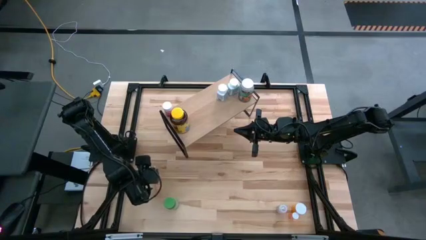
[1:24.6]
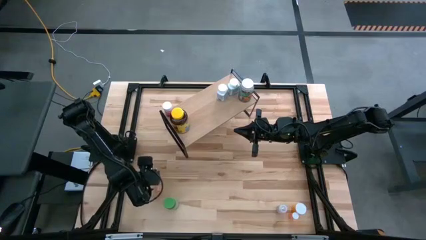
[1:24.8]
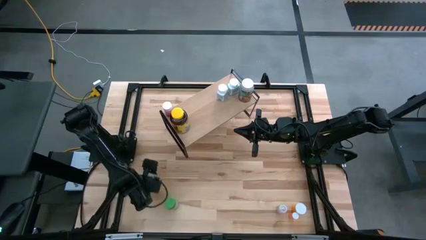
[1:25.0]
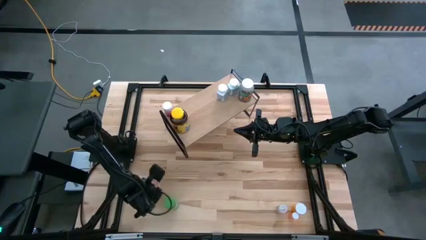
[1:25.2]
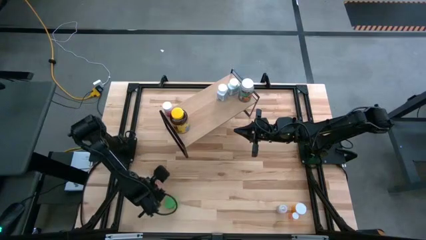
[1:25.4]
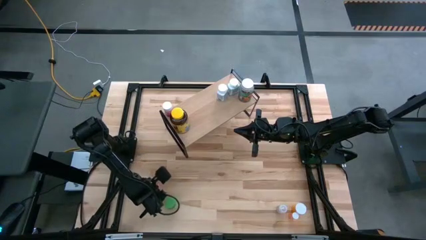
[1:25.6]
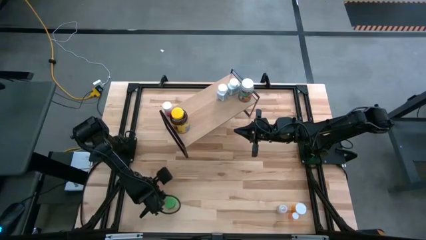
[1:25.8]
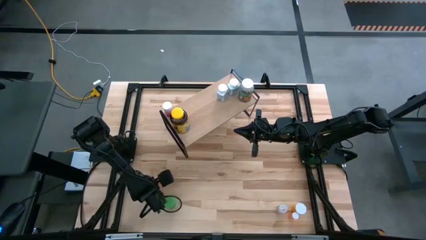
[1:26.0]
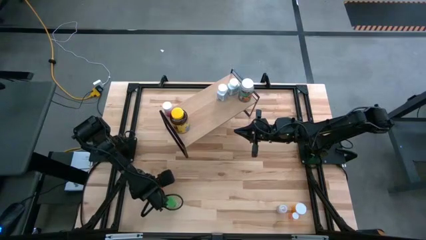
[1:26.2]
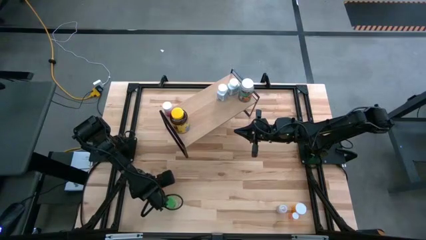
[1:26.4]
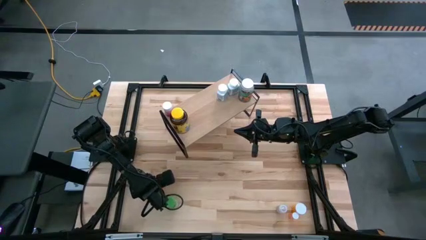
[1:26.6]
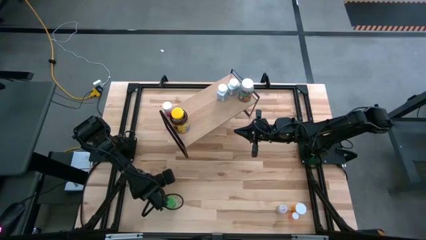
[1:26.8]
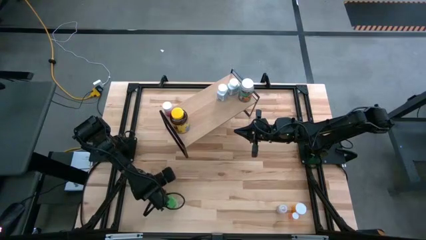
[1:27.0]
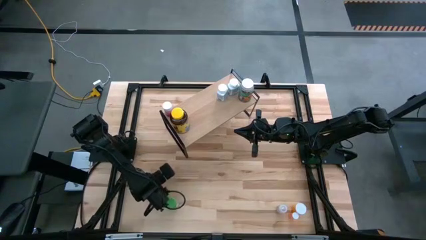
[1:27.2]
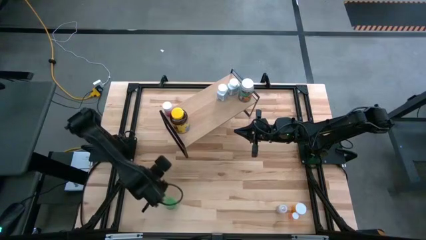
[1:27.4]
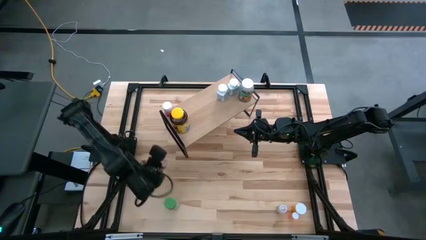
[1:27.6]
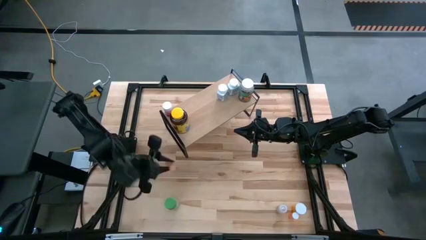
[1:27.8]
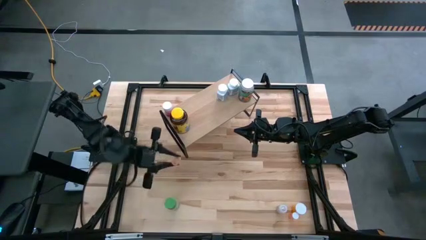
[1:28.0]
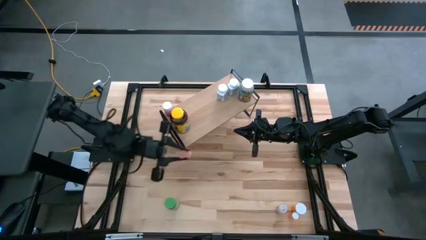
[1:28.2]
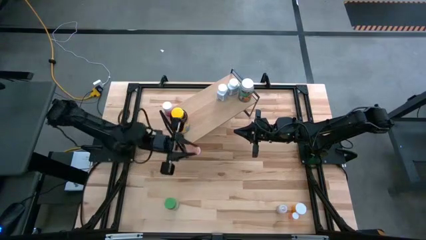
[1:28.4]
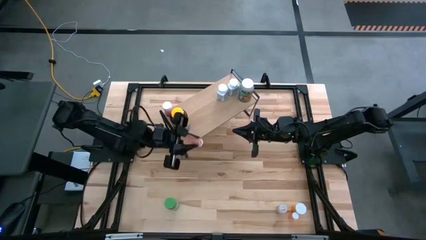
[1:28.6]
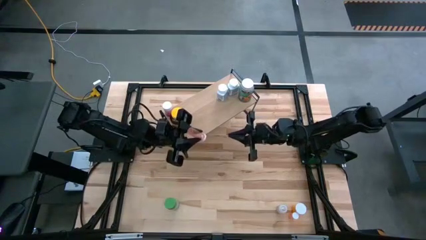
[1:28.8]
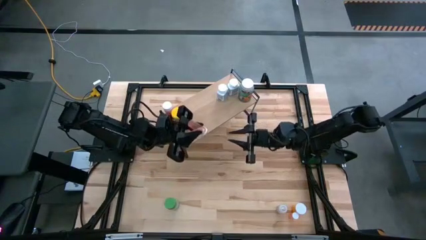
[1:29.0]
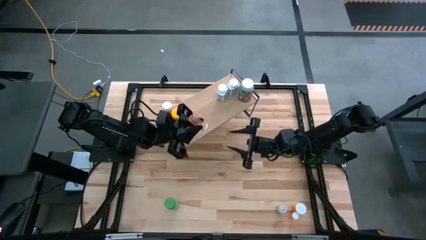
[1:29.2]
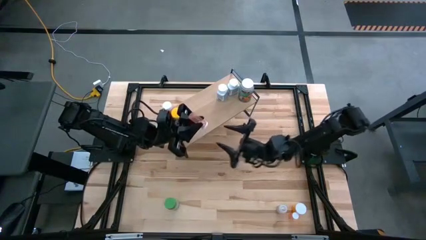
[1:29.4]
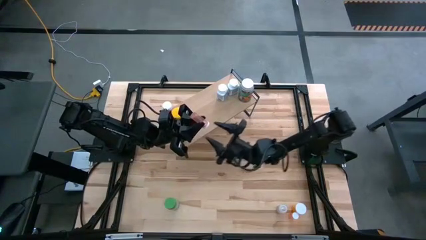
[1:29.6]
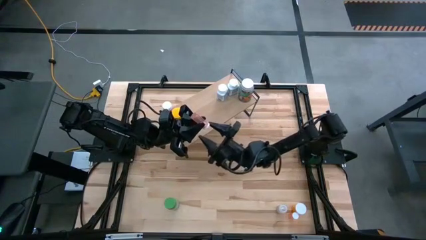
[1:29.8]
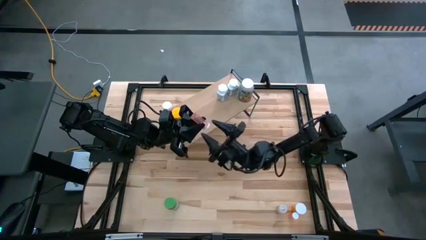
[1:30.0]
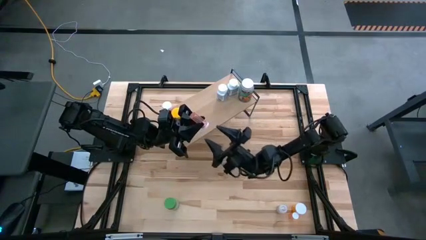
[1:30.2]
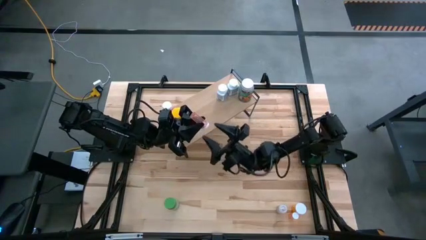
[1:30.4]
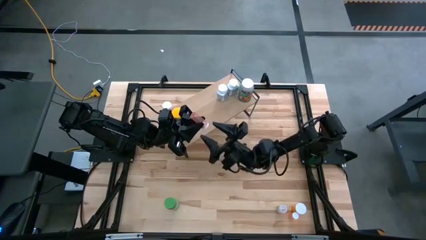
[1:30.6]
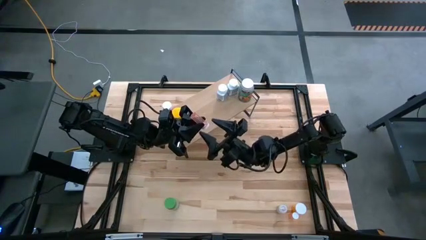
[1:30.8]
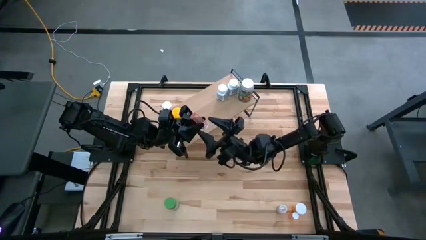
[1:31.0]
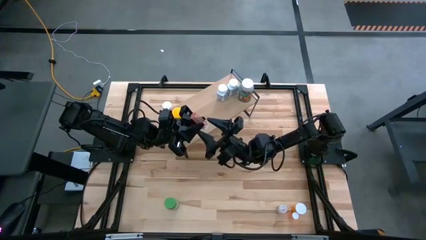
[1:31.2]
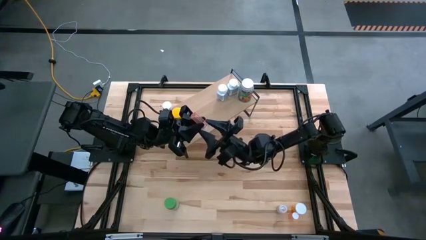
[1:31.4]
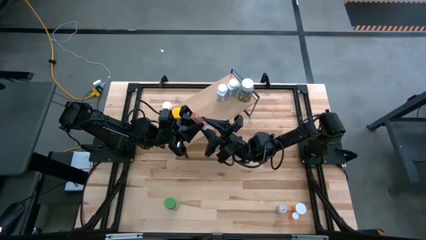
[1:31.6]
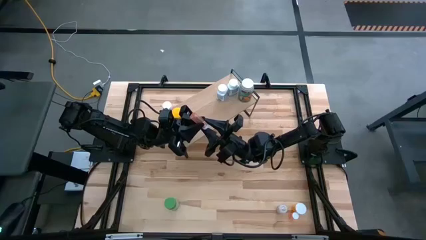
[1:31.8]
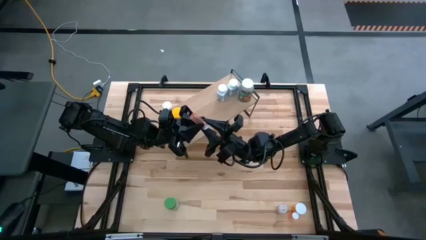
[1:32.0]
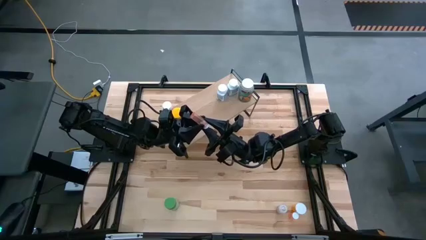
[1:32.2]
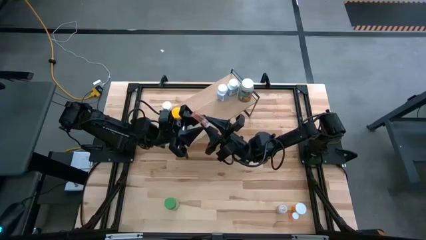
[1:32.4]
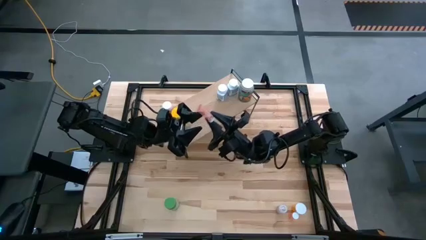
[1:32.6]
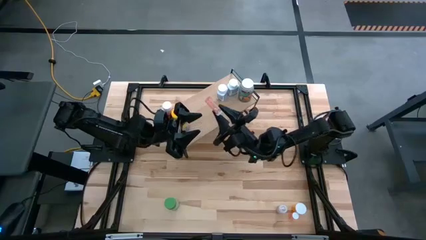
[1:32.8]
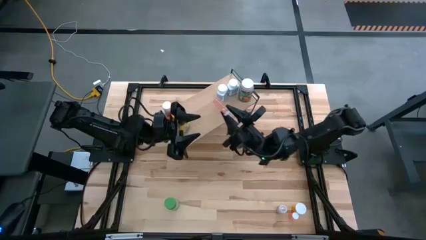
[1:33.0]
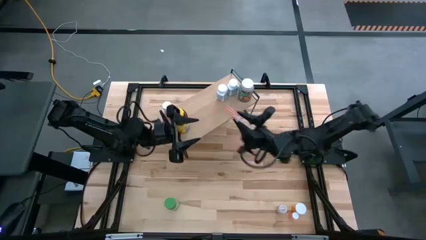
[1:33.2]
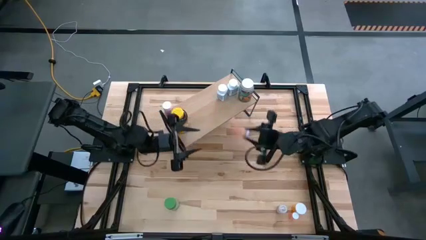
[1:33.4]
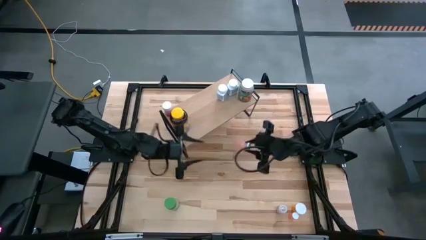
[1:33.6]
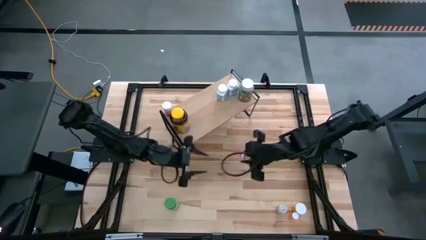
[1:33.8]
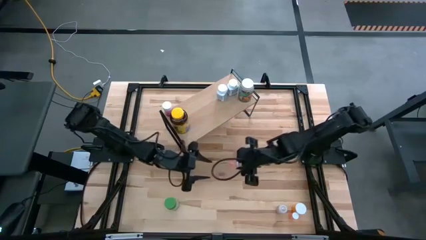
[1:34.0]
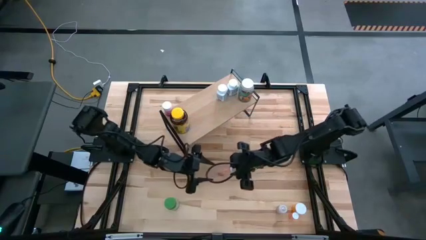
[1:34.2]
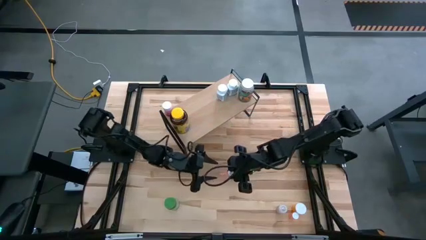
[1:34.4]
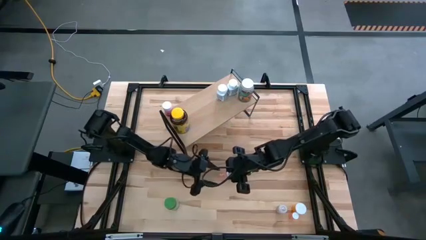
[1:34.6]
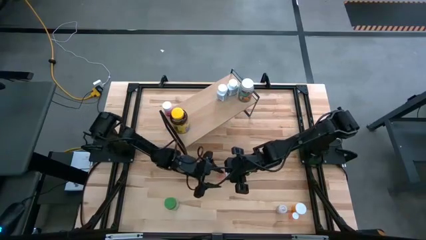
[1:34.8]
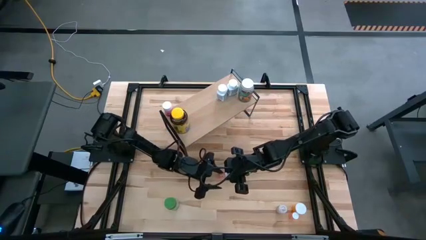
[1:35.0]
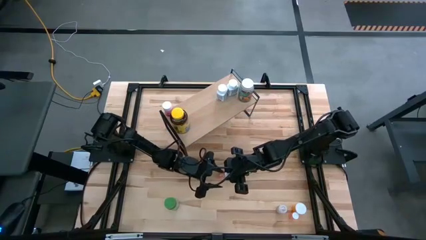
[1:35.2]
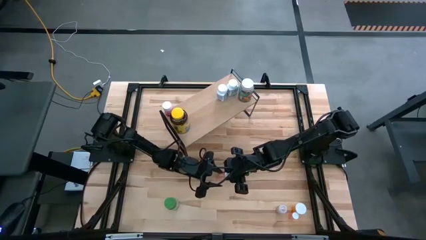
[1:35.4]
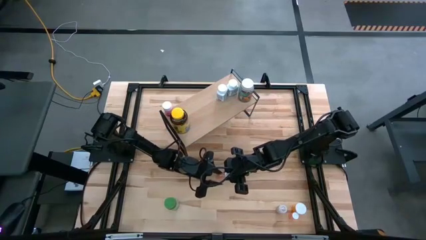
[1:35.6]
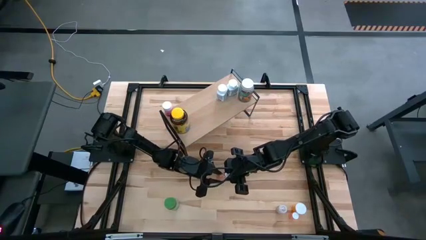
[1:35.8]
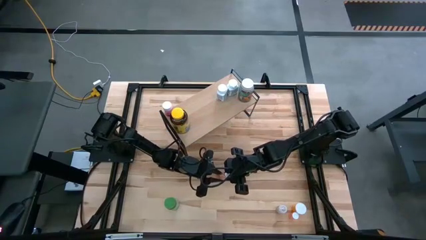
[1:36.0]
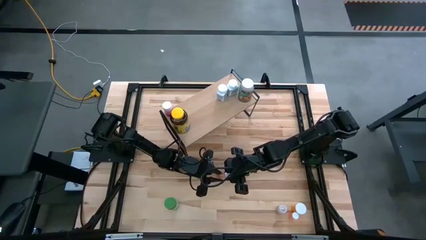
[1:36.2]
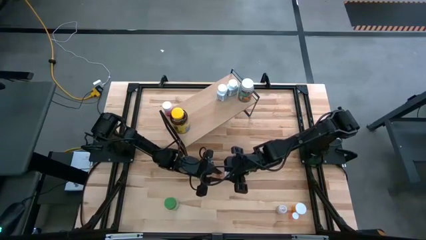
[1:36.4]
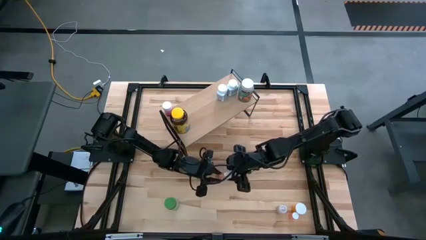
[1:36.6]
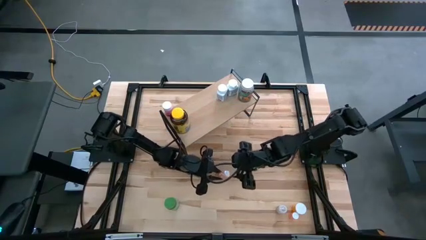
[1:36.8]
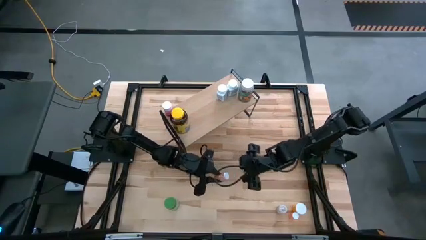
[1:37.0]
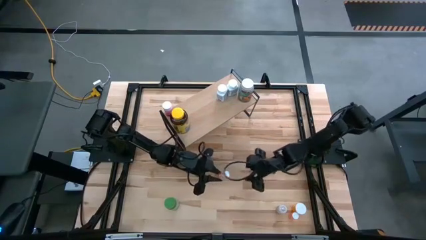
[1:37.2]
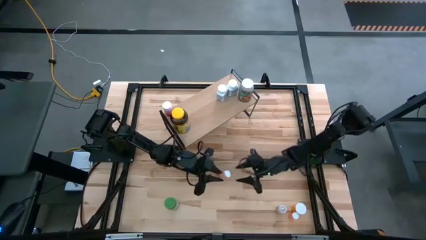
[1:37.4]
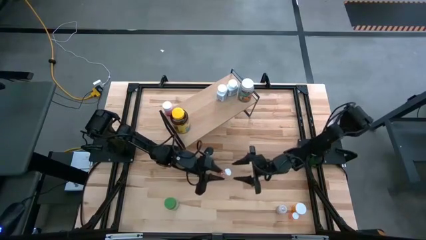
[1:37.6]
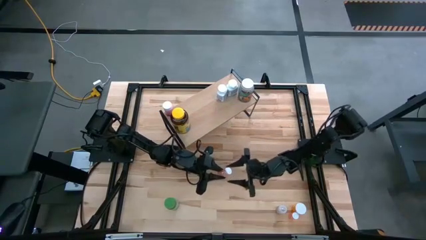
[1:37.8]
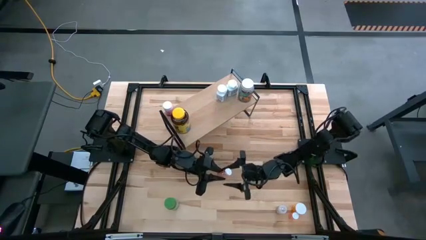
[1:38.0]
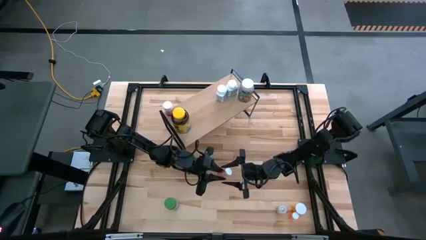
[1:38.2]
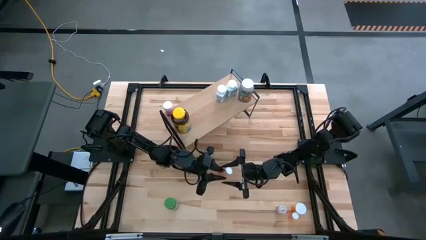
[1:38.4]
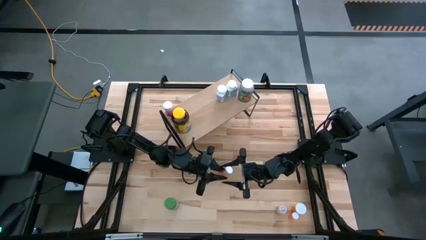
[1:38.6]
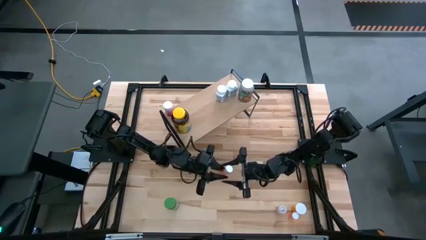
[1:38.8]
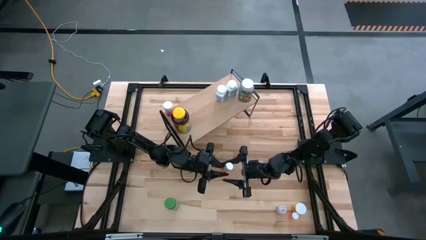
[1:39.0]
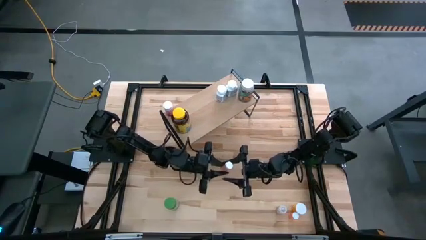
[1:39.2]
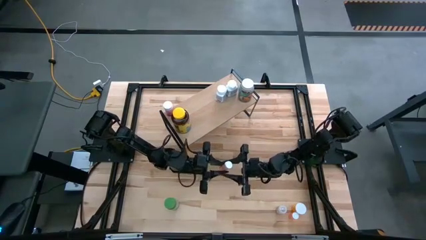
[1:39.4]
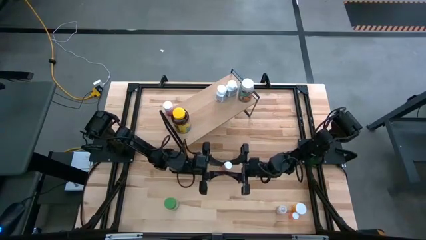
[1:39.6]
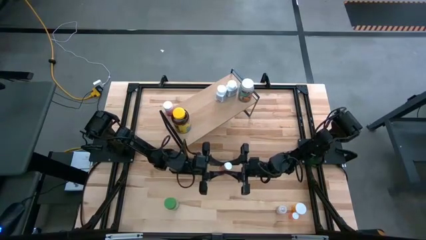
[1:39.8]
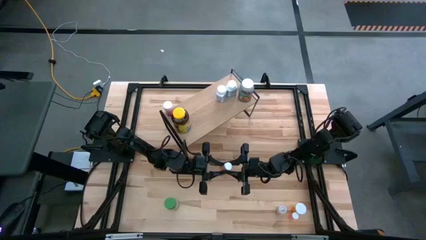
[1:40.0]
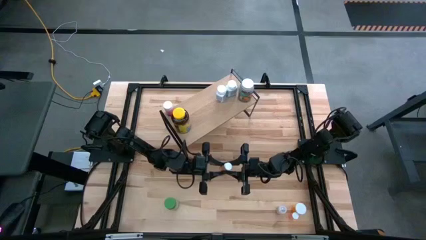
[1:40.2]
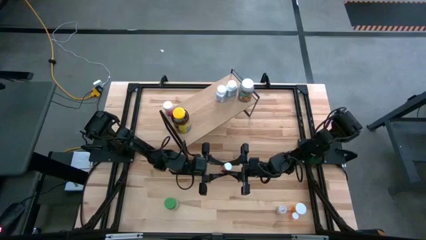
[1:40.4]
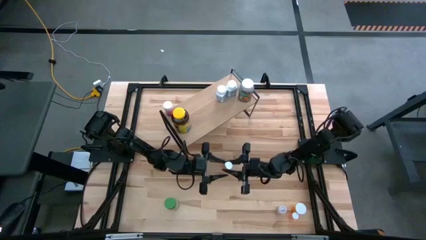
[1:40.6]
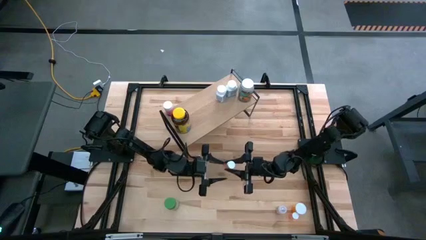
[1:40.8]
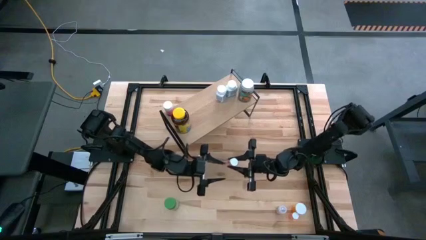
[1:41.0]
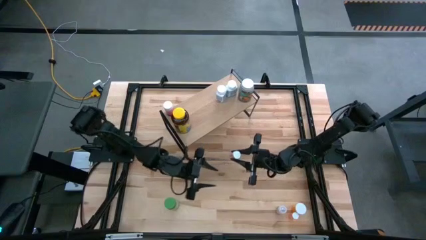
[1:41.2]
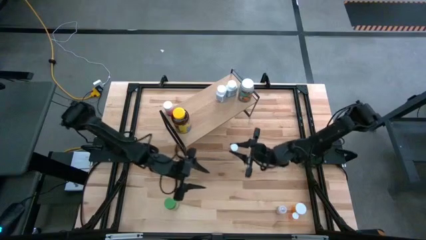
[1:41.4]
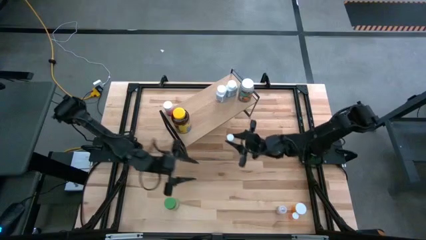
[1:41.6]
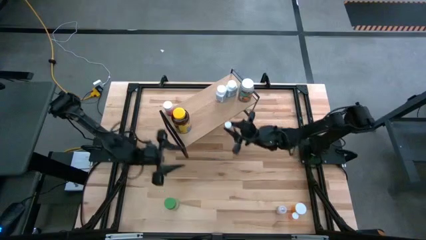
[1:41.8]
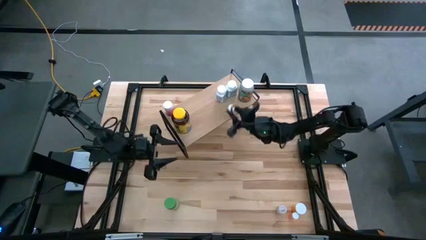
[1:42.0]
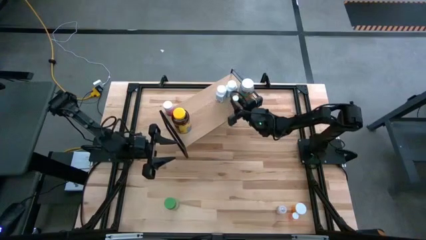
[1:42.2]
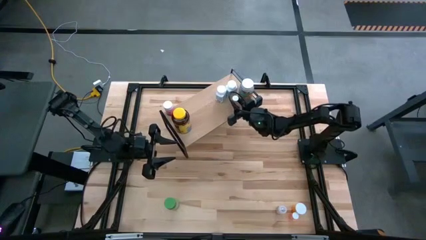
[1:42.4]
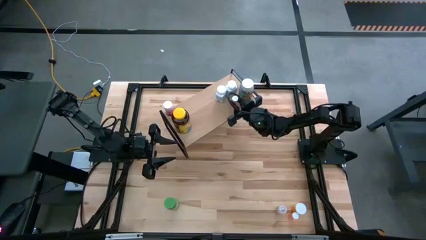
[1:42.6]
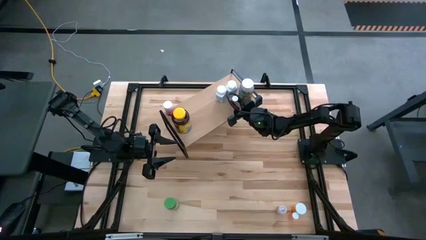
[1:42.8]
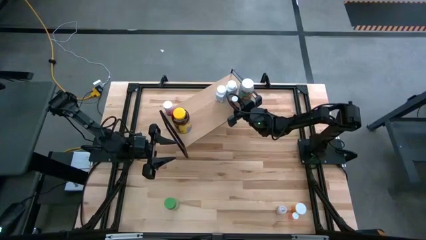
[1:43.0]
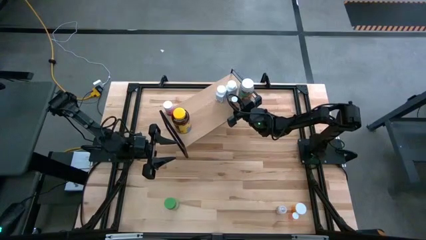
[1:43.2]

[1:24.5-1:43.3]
Task: Pick and place medicine bottles onto shelf by color
Put the left light pink medicine bottle on the shelf
